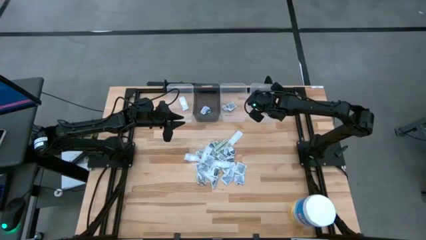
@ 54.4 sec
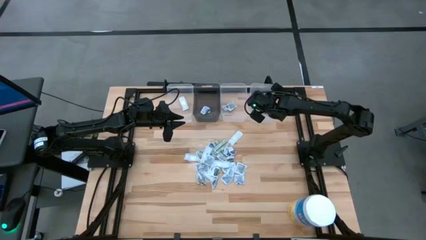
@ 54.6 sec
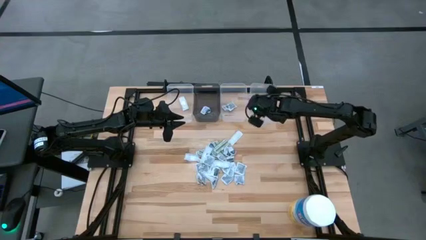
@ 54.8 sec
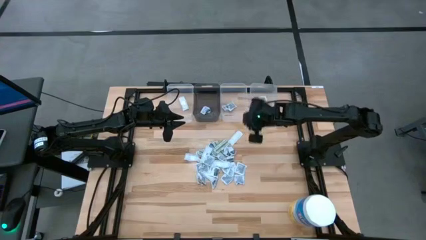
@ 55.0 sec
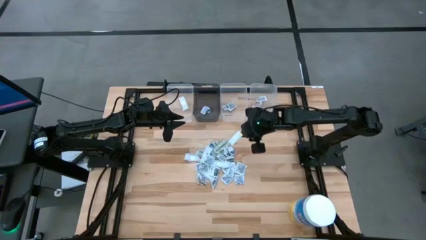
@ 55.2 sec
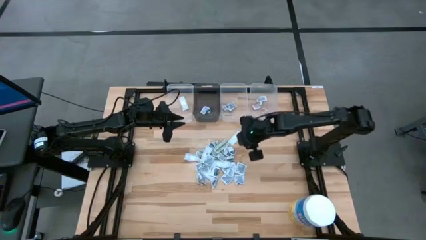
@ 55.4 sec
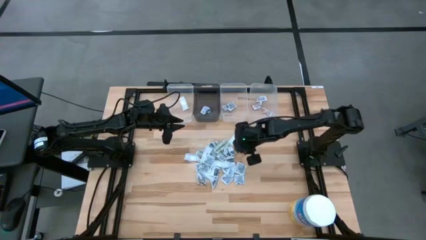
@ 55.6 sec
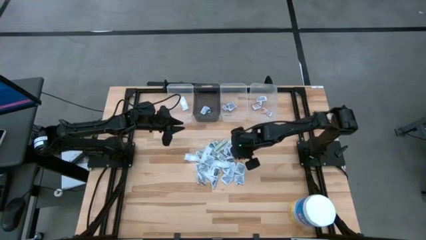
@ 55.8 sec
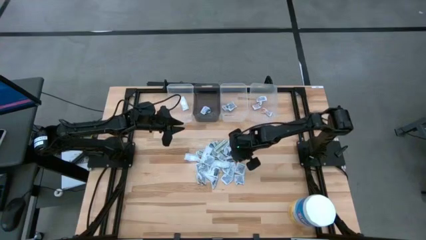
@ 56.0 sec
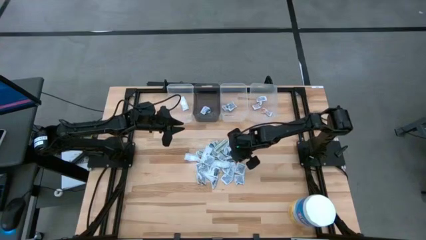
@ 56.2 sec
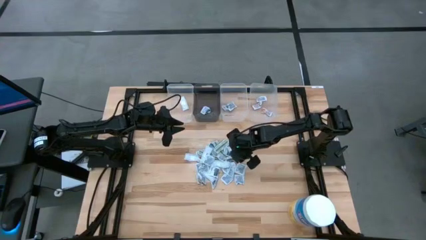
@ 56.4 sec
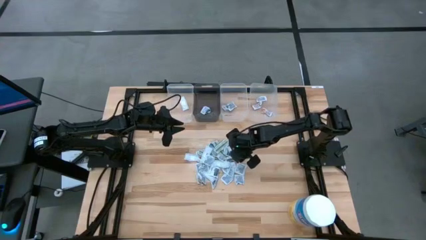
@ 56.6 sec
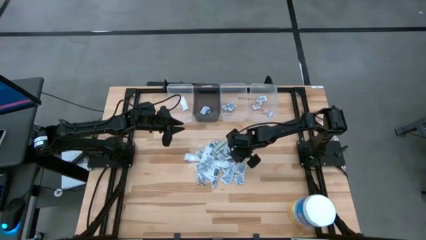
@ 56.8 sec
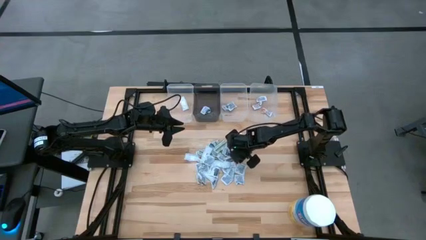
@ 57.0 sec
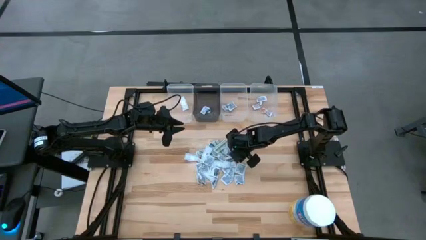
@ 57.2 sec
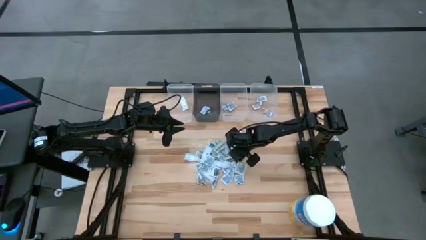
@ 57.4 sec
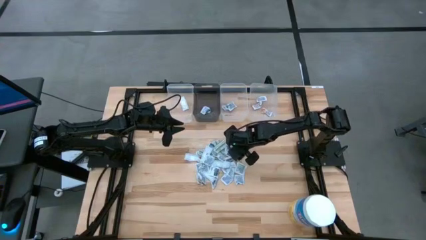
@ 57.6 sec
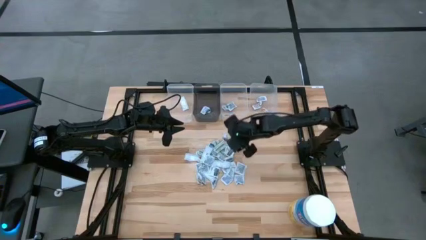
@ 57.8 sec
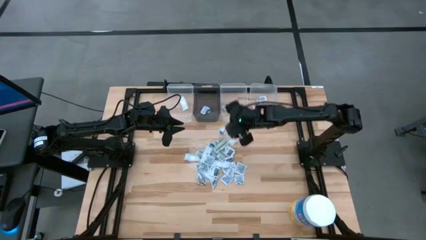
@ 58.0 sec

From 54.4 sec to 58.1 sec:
Task: Pick & Place First Aid Supplies
Put the towelette pack into the middle transparent bin

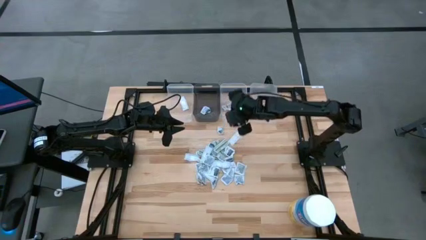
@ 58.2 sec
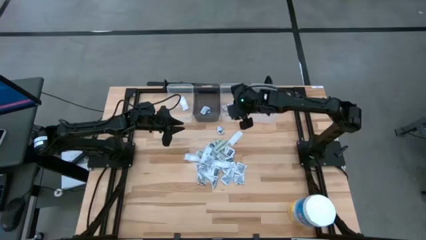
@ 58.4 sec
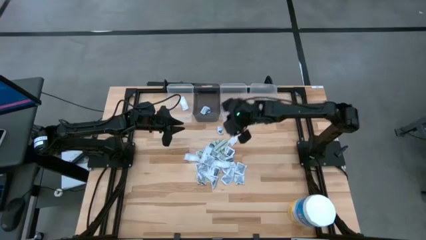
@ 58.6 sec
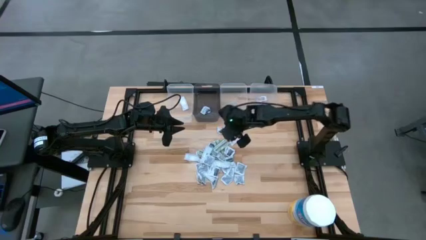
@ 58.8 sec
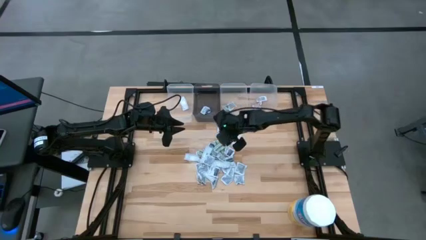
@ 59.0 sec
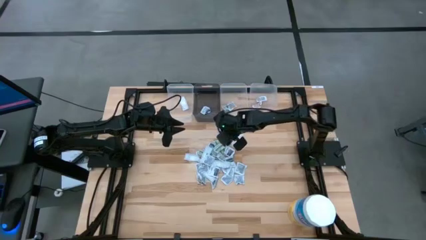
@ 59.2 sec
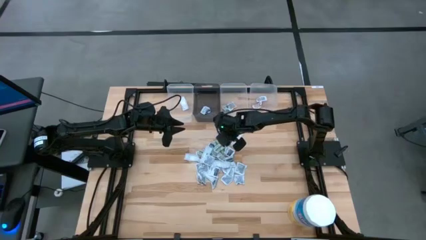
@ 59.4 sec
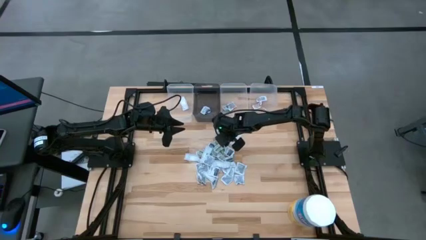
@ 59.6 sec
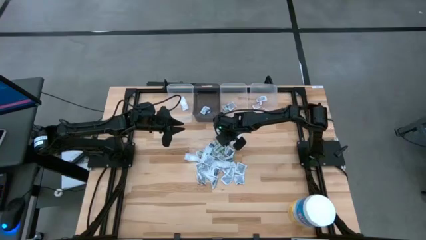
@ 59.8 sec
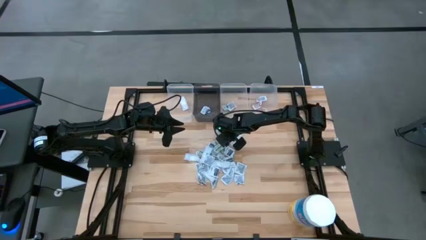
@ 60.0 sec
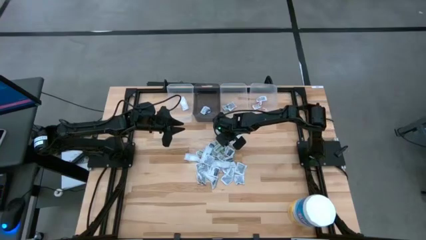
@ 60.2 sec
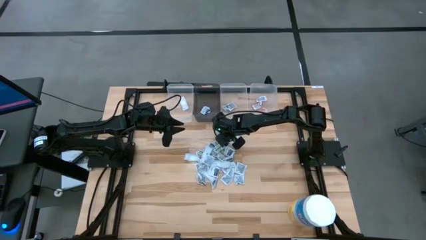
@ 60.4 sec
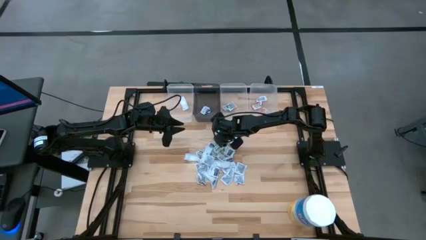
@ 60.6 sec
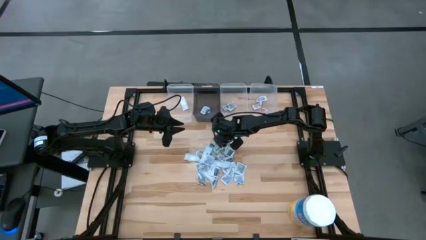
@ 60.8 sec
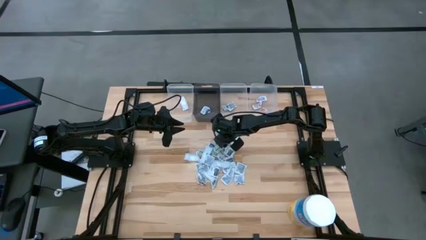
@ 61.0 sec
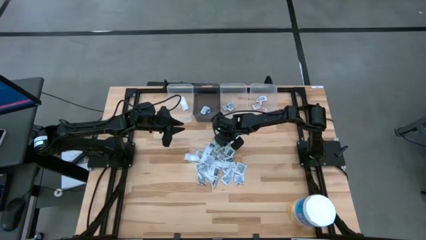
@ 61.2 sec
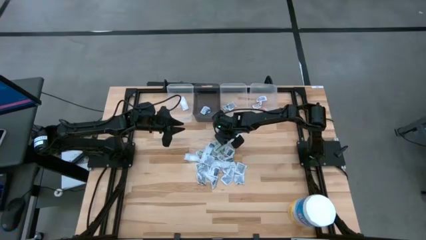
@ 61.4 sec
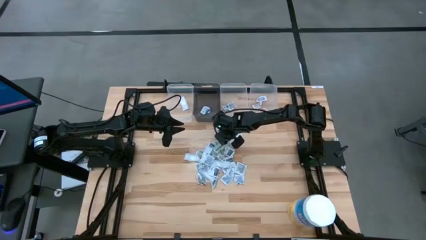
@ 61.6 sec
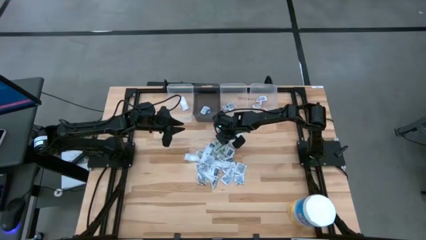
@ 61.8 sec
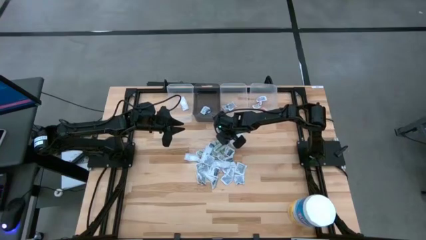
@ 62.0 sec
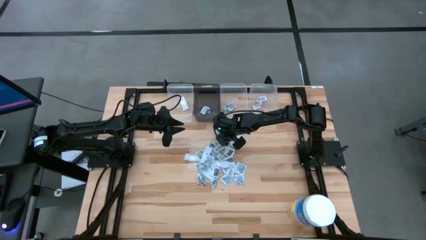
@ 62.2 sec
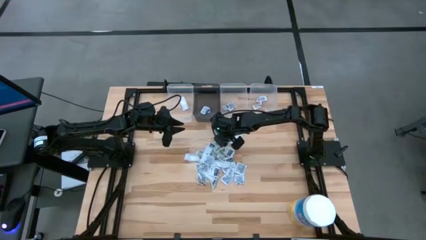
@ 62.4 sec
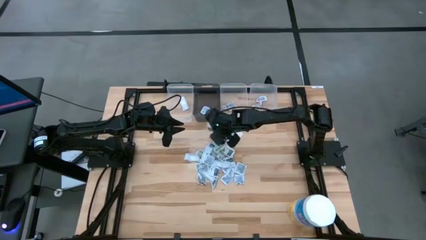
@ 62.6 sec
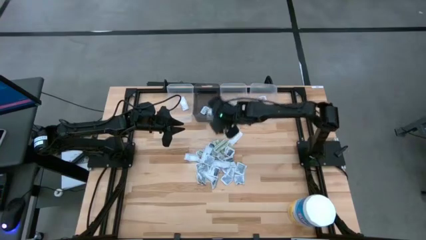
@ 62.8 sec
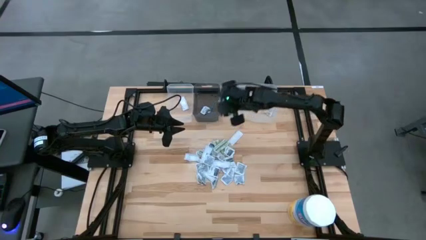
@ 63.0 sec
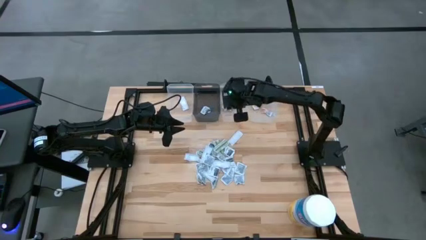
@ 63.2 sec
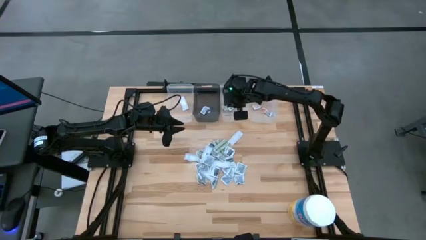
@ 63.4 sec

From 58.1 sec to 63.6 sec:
Put the towelette pack into the middle transparent bin

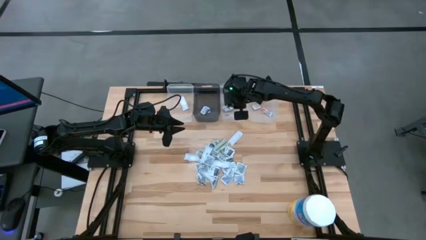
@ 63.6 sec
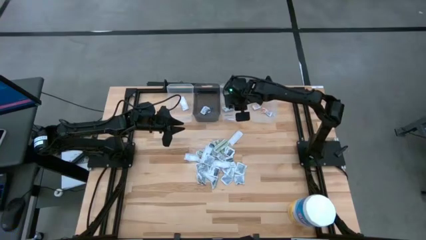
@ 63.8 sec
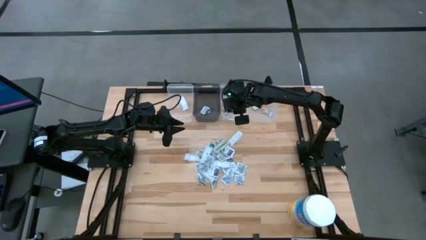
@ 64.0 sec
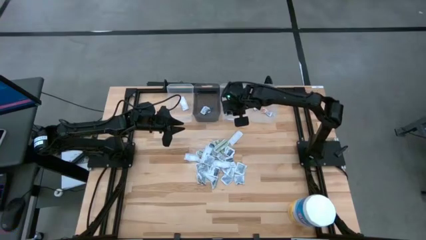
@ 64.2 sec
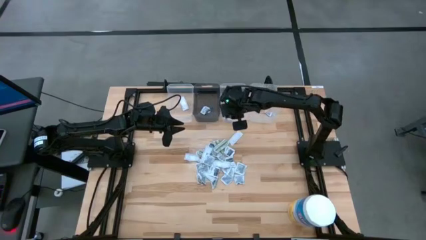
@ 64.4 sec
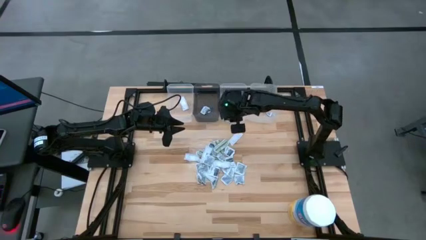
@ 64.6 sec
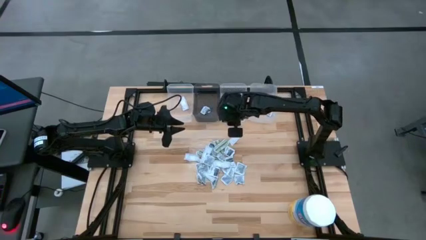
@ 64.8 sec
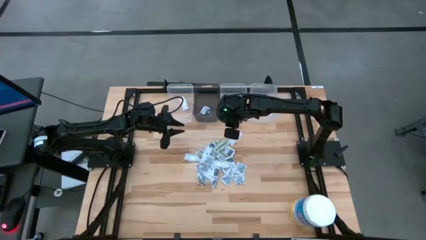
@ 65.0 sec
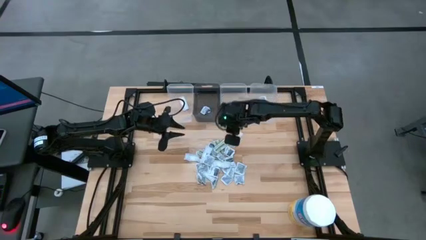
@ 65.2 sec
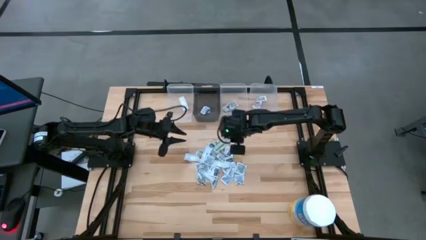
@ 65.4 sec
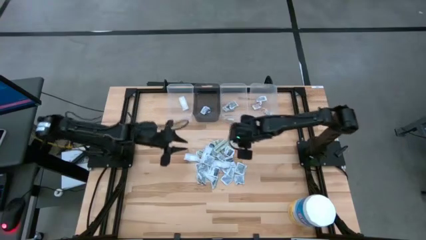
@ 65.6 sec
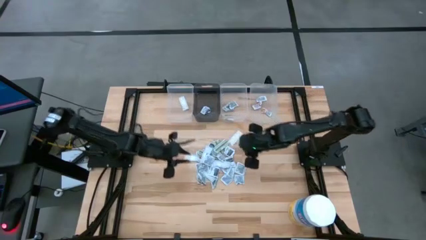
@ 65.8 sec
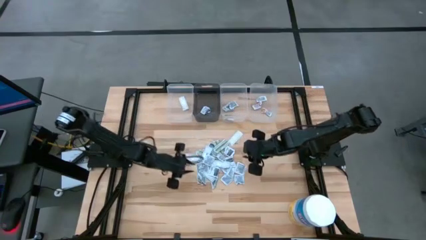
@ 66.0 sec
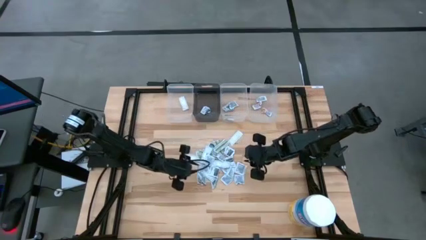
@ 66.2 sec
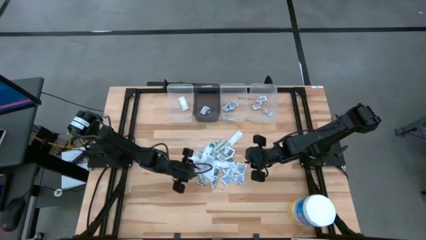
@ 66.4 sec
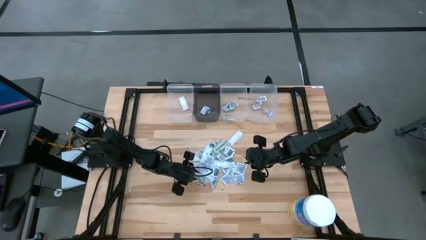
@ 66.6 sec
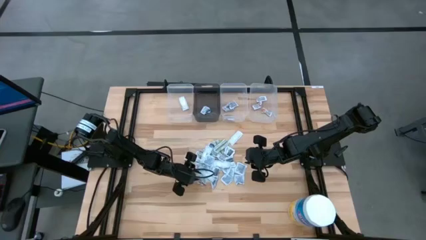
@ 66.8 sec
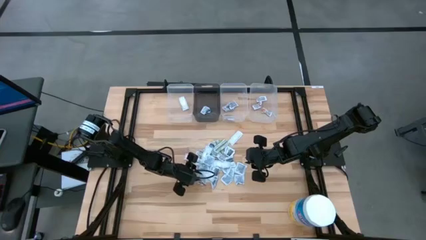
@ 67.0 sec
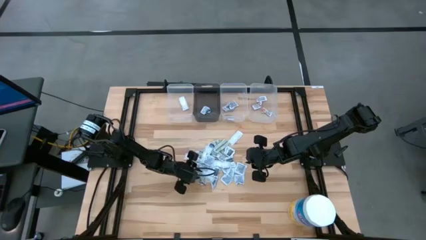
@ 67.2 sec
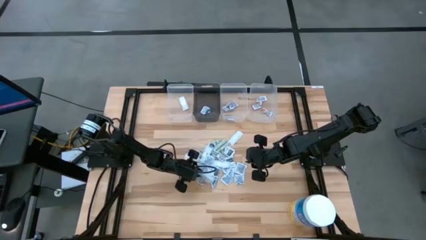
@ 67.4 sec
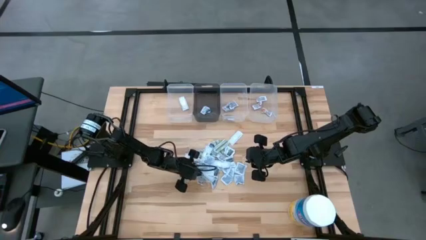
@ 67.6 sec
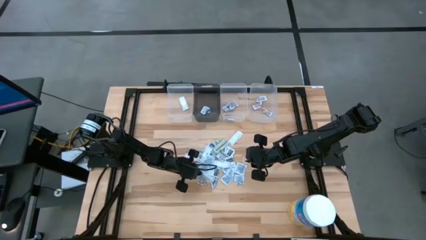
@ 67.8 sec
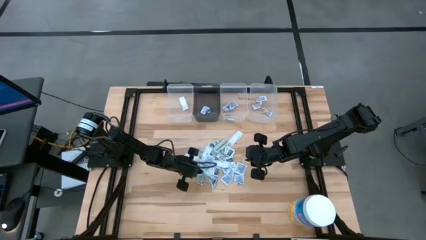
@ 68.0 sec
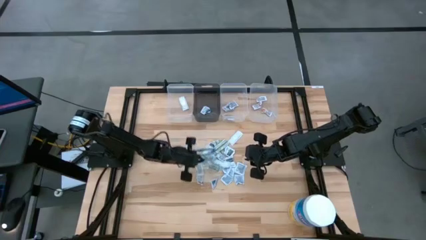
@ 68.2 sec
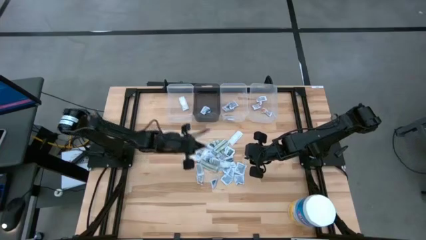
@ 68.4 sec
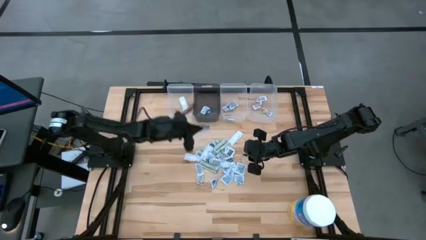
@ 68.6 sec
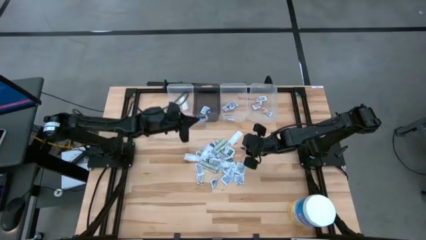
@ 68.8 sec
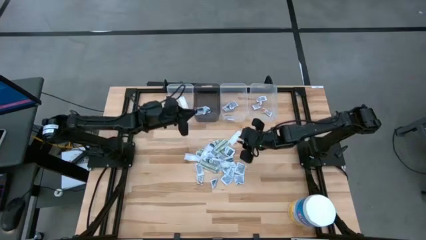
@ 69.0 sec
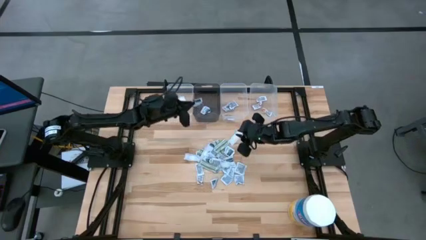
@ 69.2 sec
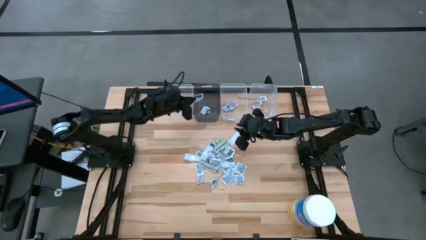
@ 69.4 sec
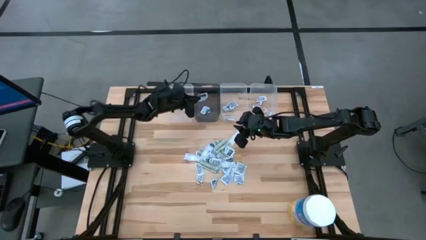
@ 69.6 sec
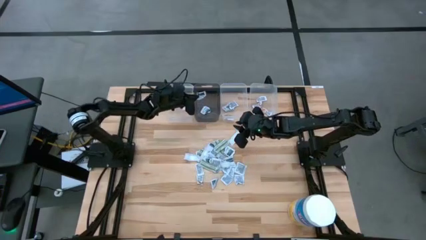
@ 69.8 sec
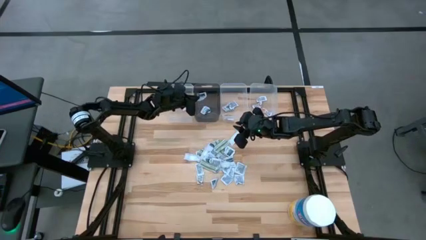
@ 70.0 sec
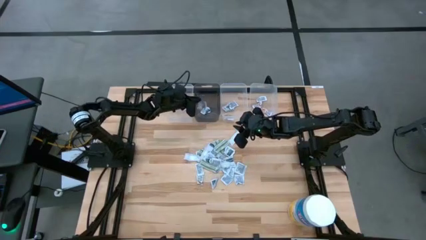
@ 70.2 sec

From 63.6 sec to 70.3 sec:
Put the alcohol pad into the black bin
